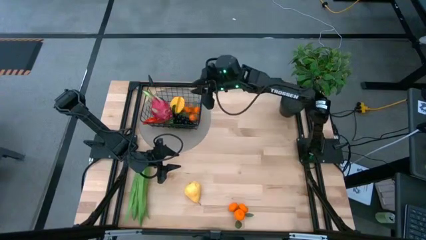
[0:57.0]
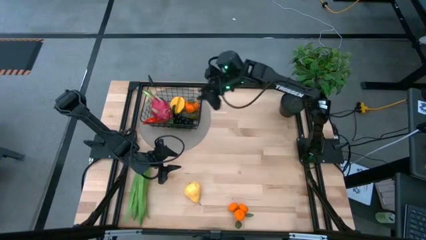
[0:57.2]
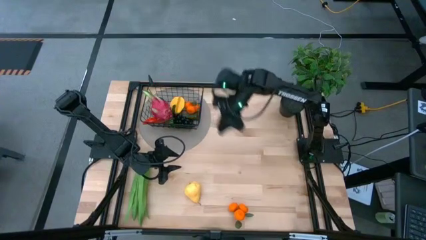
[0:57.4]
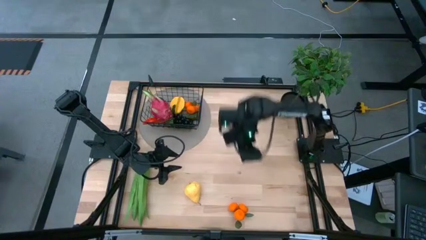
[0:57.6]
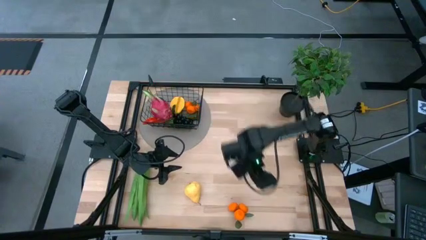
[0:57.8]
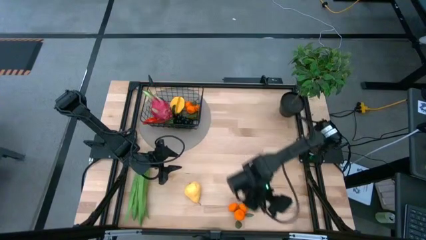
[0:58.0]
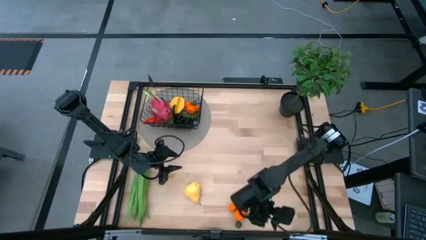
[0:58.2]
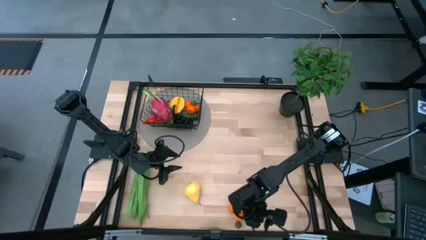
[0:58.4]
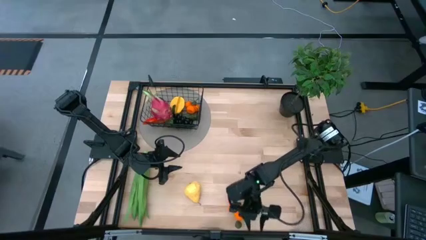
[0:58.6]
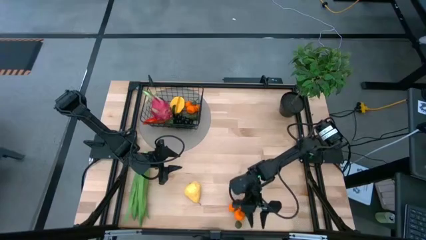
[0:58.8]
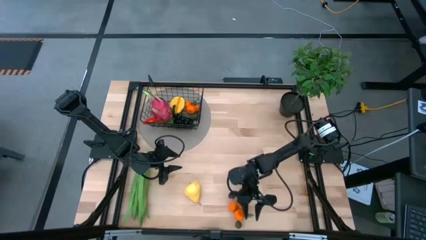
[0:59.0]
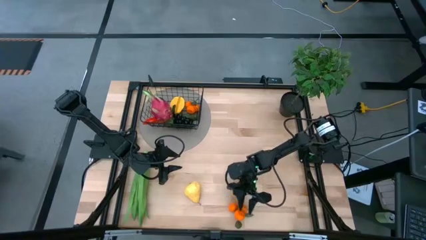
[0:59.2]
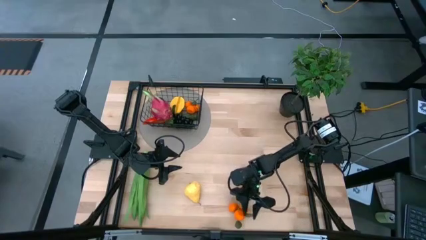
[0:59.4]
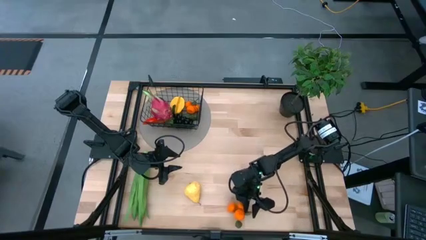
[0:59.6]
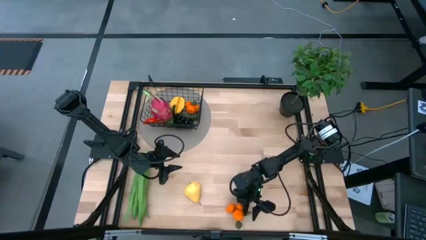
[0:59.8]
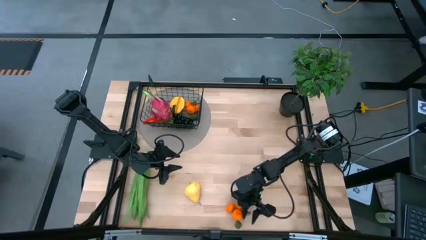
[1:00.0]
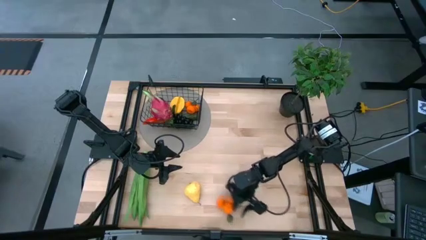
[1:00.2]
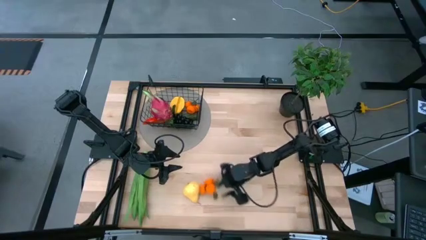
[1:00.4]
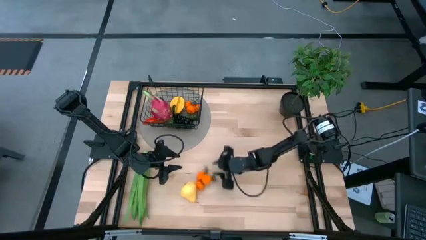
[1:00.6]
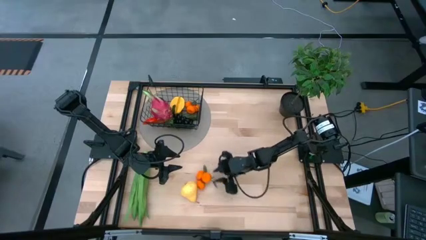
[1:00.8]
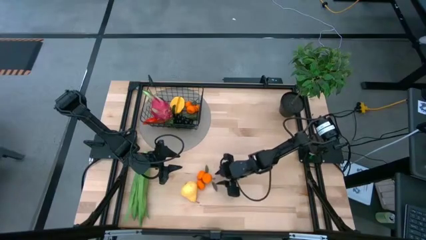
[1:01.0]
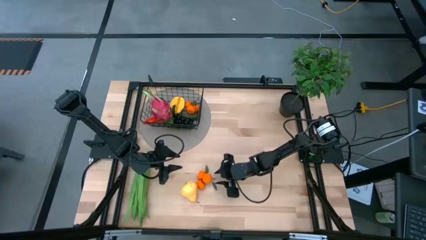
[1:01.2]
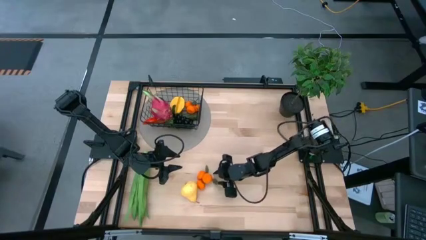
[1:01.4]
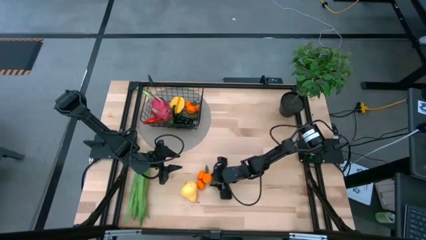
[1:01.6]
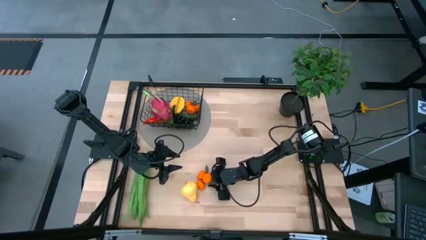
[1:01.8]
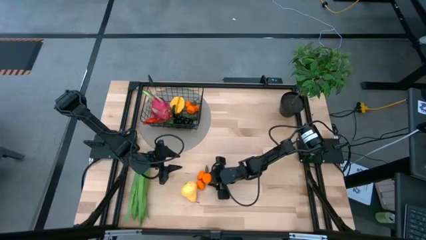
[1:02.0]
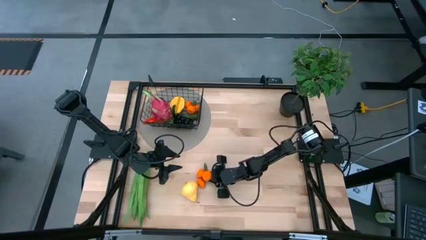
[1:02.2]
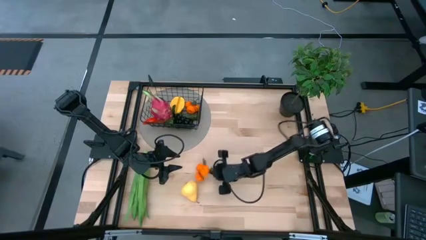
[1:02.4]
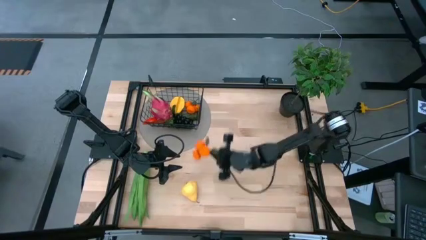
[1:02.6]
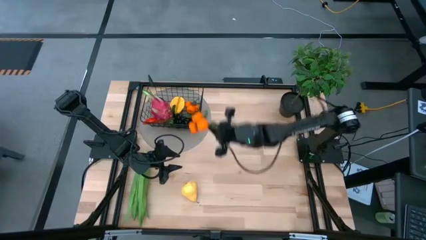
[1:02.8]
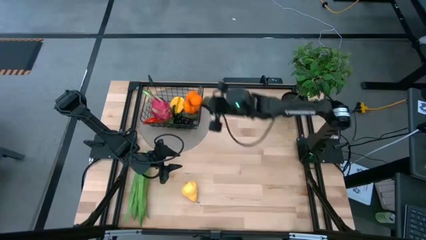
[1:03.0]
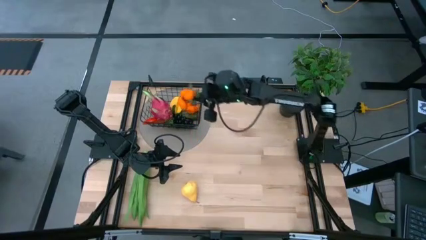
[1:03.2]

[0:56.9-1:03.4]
Task: Build produce basket
Put the orange tangerine into the black wire basket

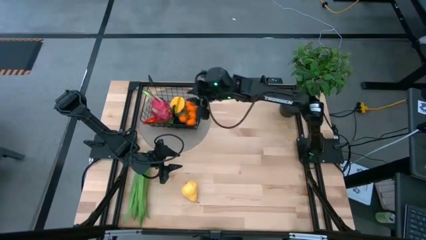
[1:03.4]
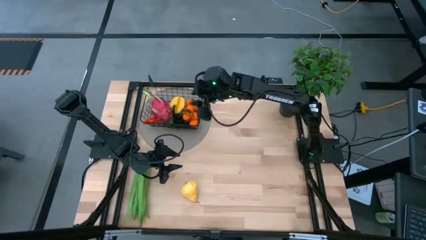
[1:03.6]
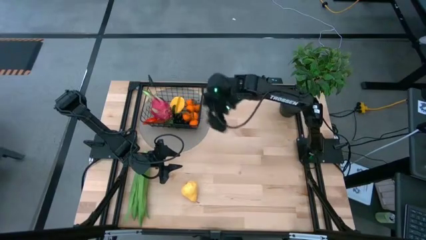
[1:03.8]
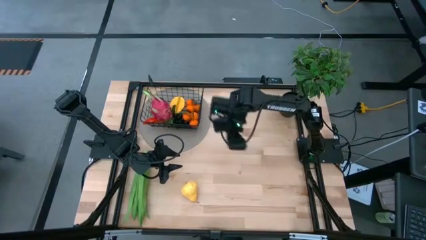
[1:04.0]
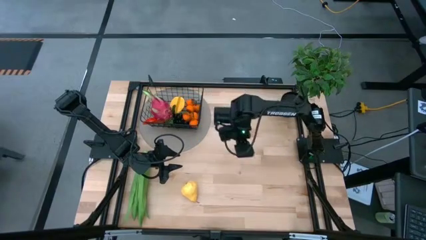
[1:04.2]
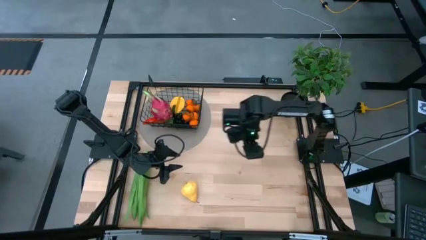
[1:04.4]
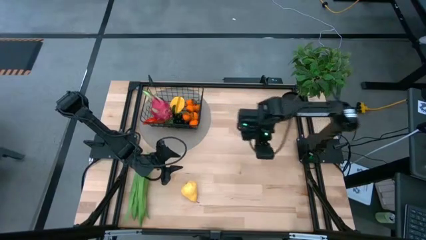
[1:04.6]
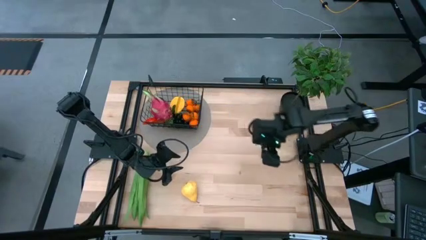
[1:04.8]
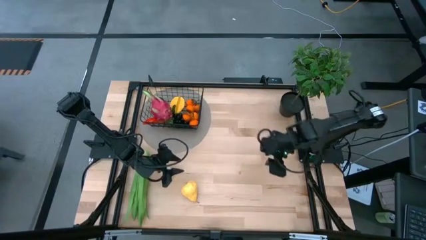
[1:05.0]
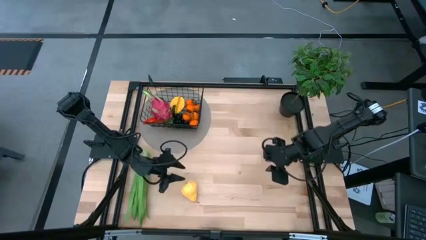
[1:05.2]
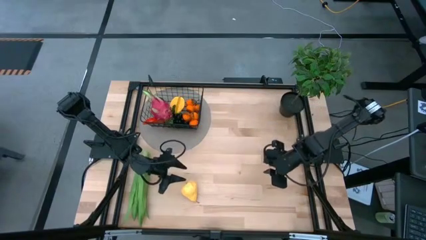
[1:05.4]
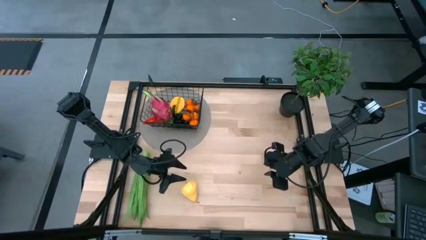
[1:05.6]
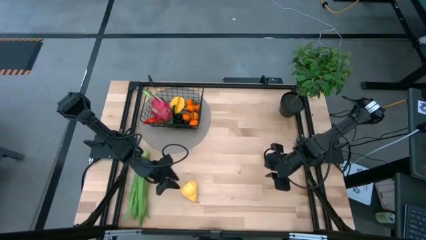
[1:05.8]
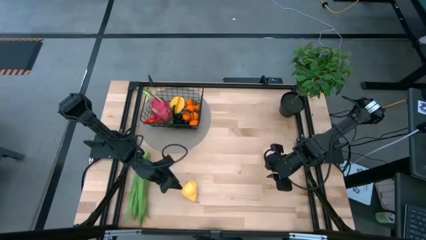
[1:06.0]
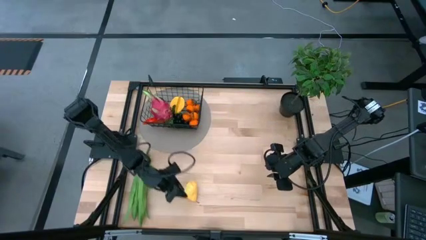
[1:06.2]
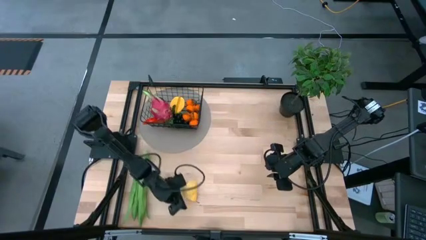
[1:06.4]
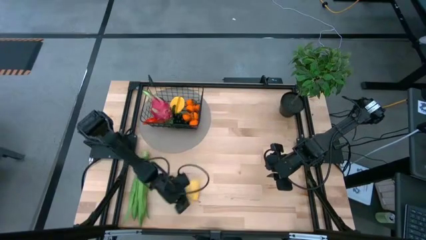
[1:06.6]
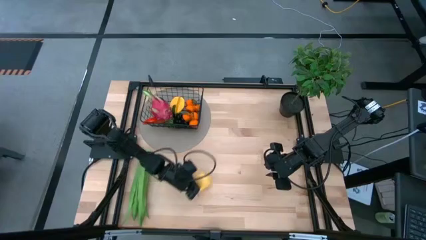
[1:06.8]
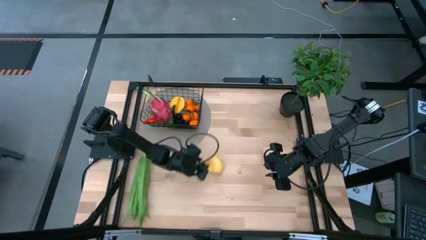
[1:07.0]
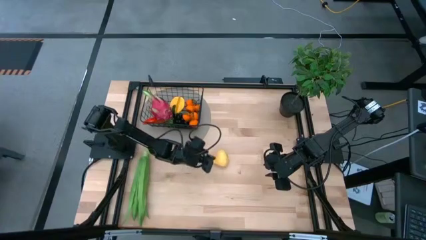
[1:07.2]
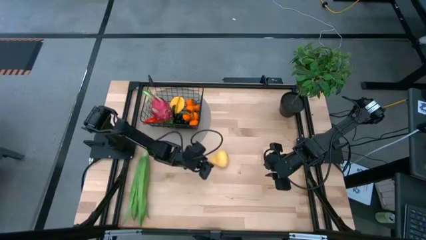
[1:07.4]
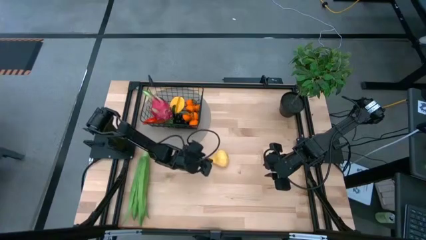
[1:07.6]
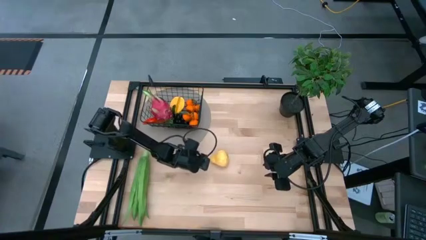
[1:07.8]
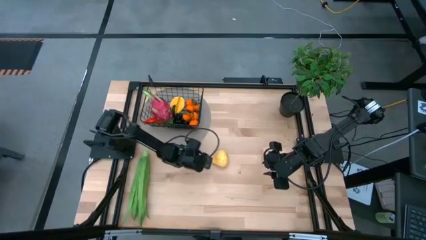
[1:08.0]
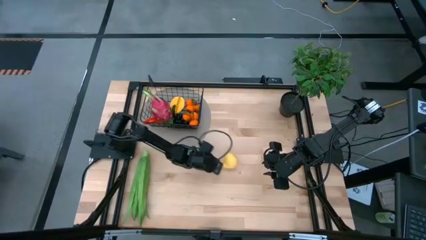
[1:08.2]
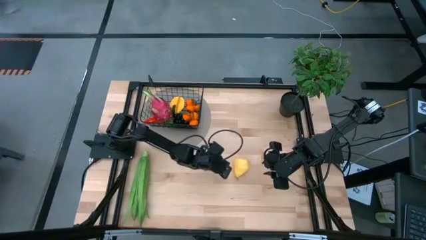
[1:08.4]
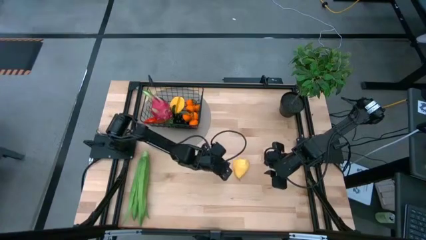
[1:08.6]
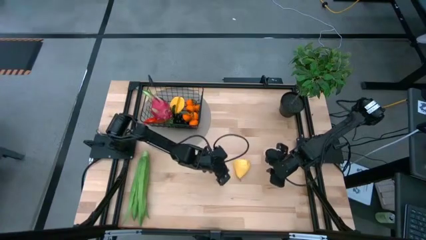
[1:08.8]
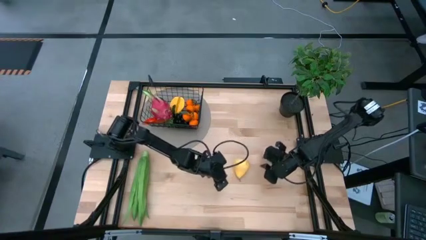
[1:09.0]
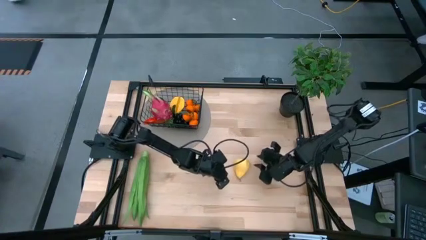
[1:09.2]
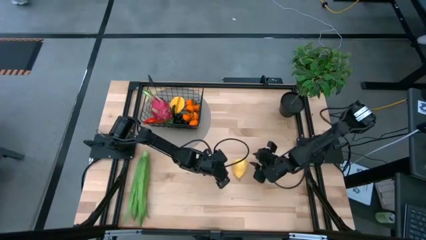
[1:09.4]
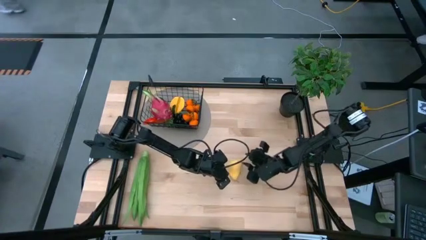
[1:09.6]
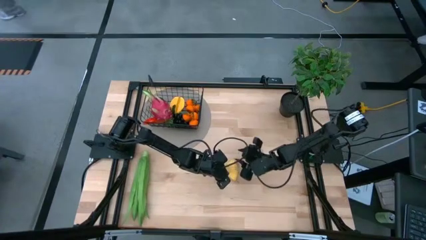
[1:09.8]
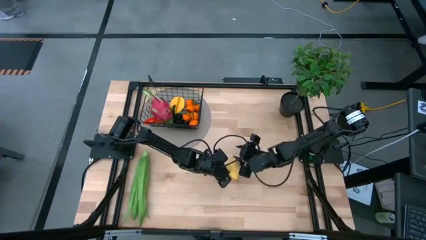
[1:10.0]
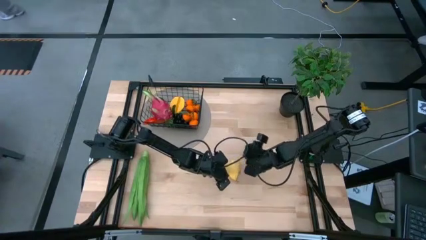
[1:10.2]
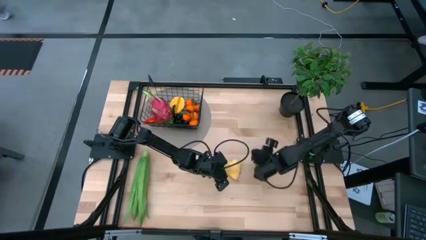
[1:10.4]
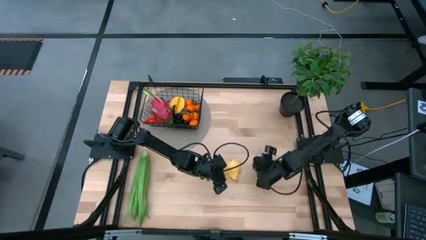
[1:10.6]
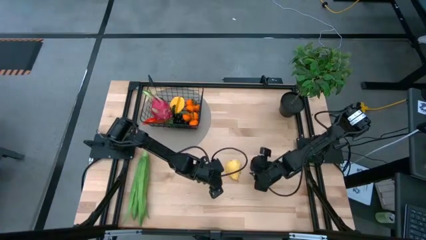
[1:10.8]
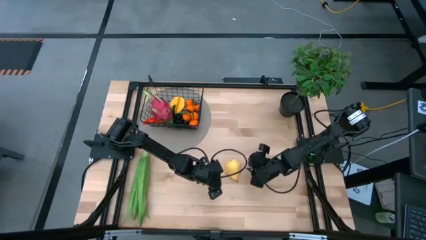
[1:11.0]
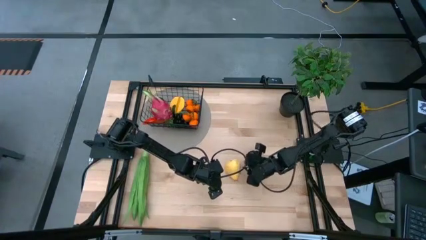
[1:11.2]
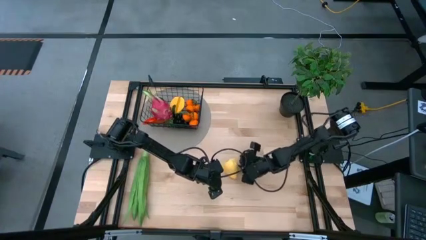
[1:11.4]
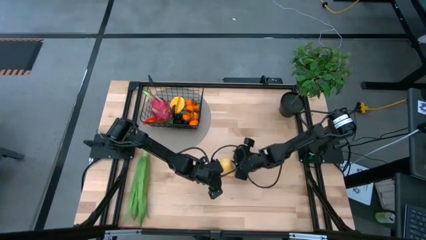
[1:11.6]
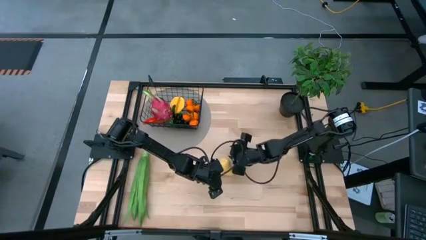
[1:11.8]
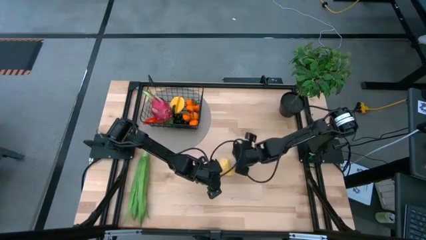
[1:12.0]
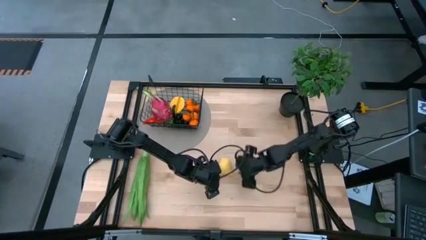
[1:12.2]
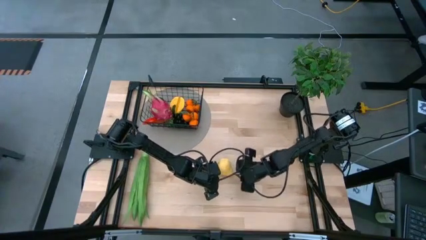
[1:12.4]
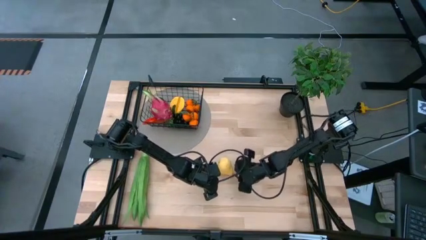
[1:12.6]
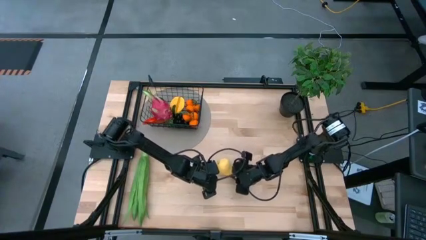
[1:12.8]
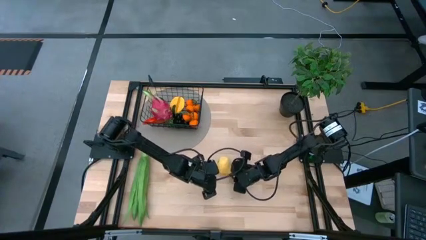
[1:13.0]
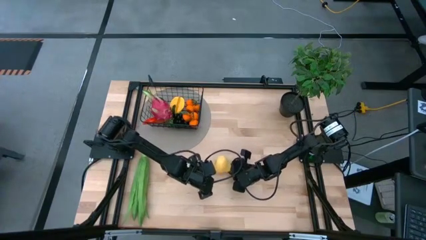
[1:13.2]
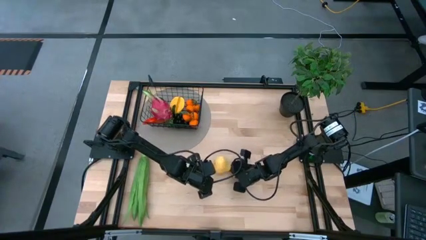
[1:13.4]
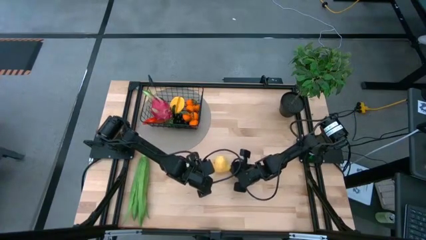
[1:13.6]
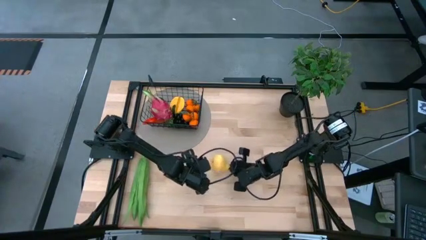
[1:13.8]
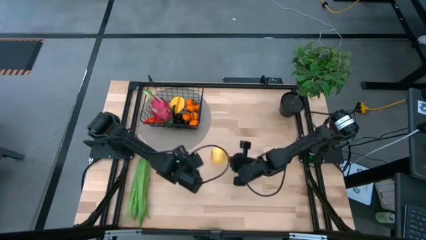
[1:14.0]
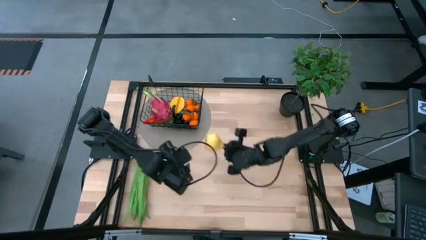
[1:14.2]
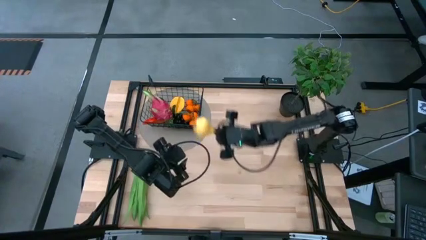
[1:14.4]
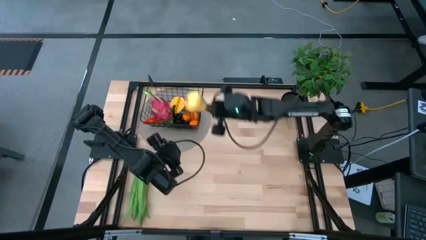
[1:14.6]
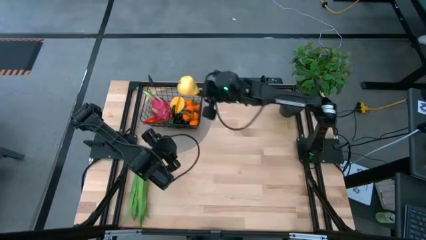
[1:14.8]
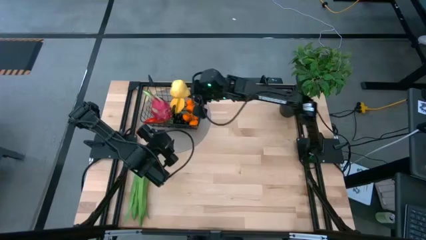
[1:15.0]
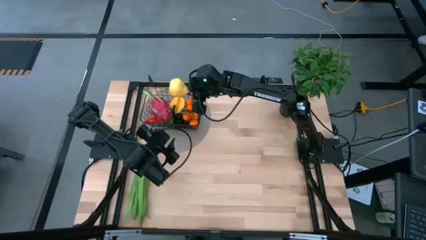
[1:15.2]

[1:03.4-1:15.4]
Put the yellow pear into the black wire basket
